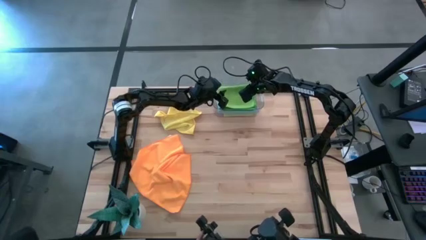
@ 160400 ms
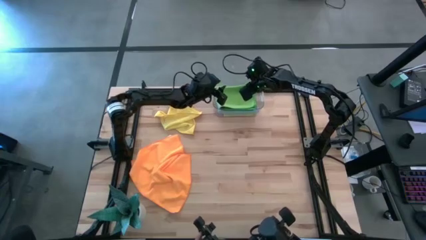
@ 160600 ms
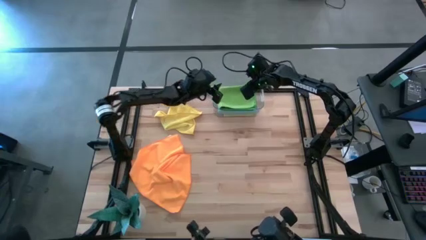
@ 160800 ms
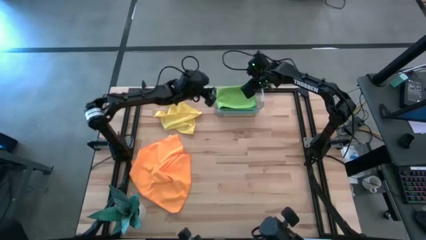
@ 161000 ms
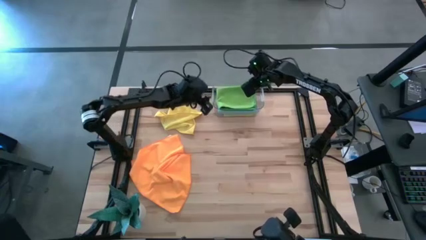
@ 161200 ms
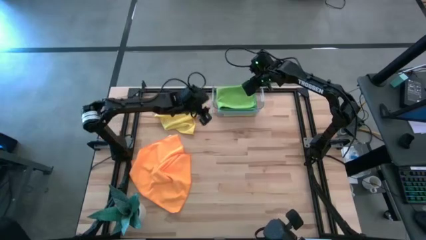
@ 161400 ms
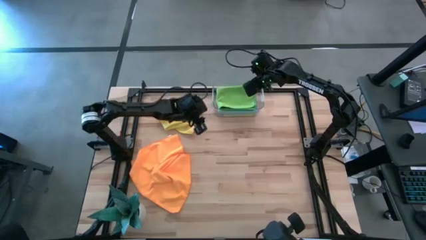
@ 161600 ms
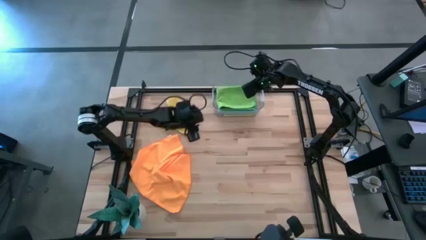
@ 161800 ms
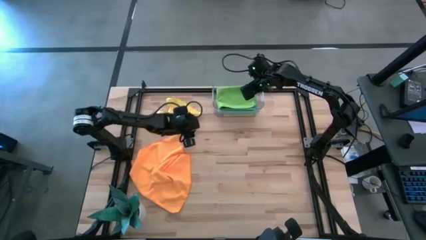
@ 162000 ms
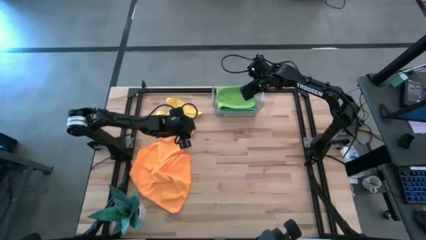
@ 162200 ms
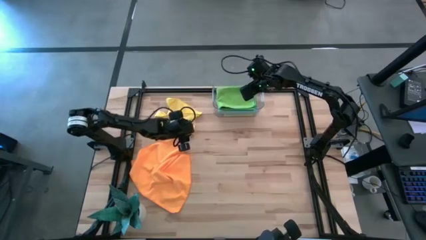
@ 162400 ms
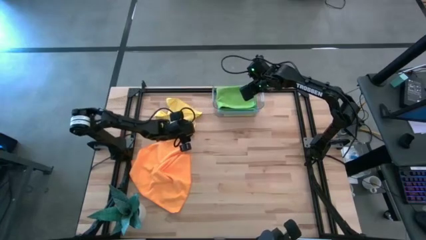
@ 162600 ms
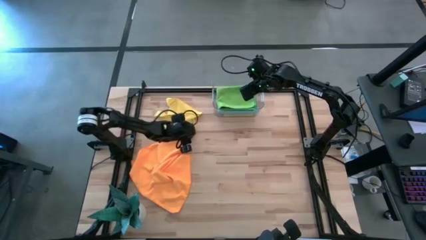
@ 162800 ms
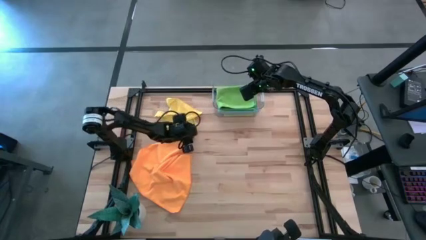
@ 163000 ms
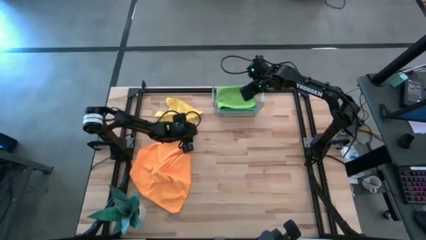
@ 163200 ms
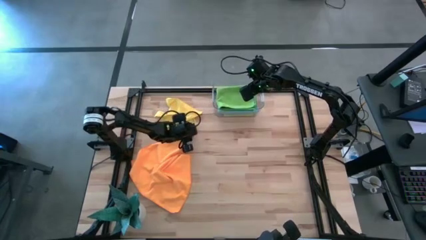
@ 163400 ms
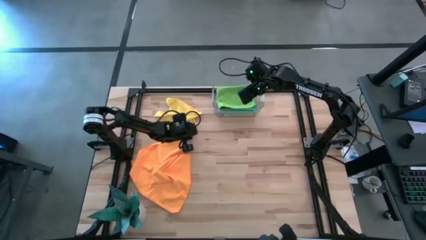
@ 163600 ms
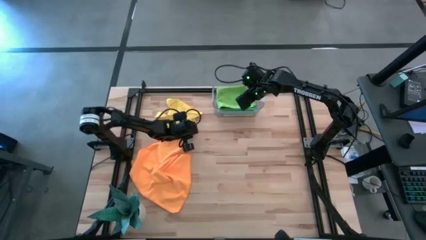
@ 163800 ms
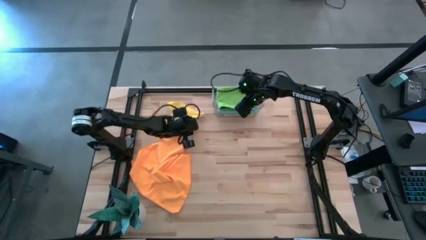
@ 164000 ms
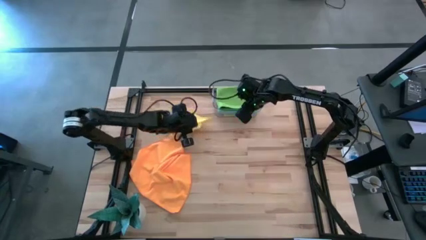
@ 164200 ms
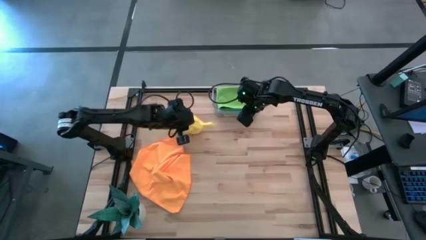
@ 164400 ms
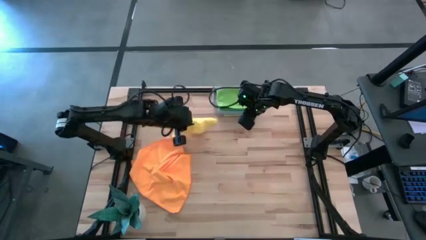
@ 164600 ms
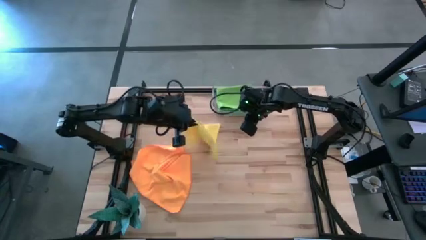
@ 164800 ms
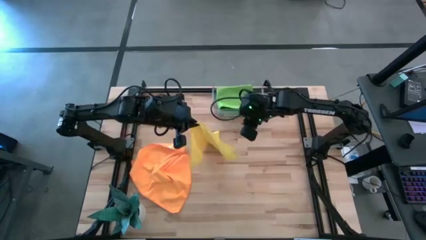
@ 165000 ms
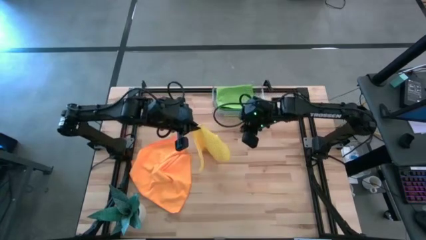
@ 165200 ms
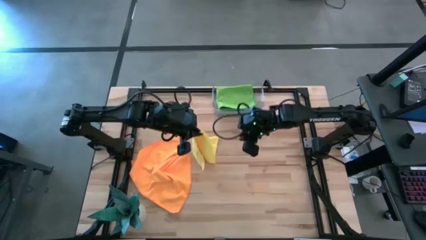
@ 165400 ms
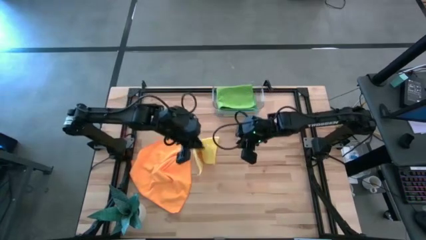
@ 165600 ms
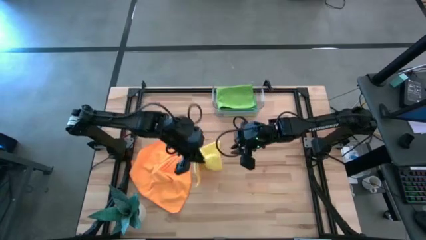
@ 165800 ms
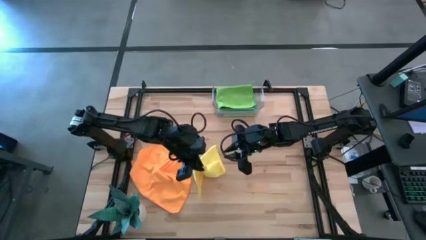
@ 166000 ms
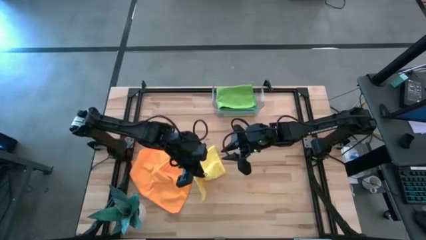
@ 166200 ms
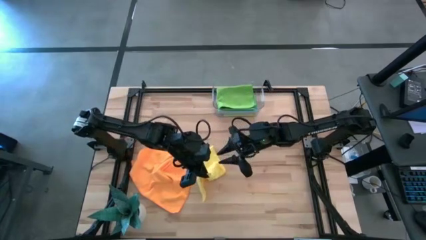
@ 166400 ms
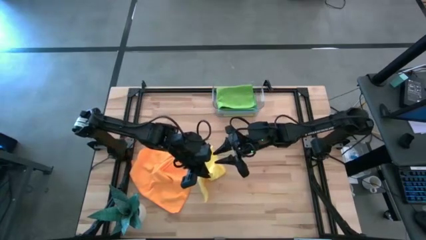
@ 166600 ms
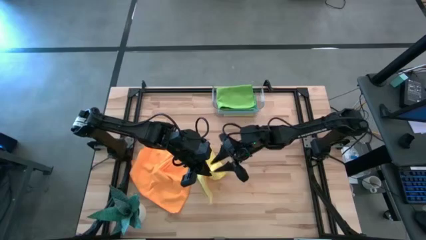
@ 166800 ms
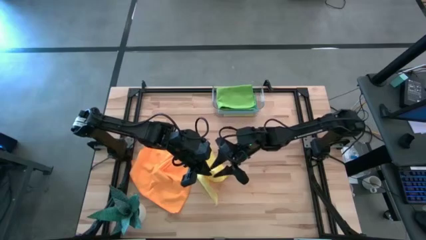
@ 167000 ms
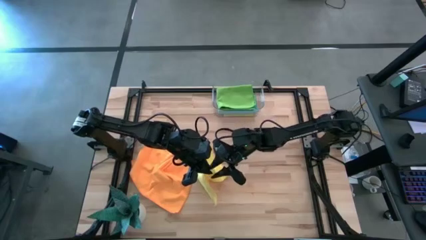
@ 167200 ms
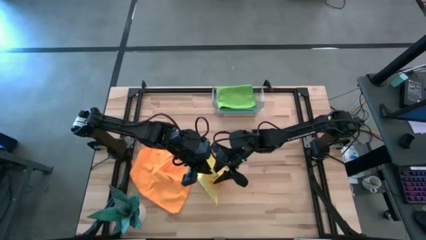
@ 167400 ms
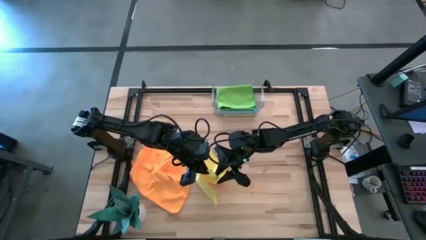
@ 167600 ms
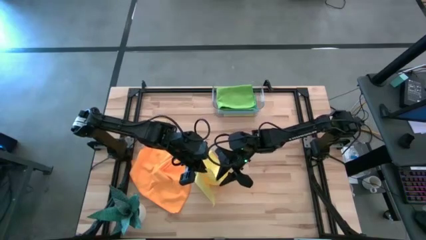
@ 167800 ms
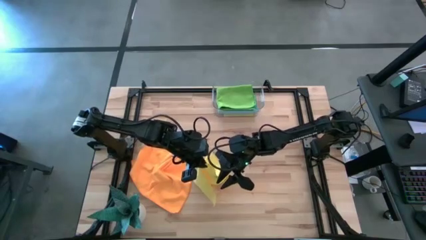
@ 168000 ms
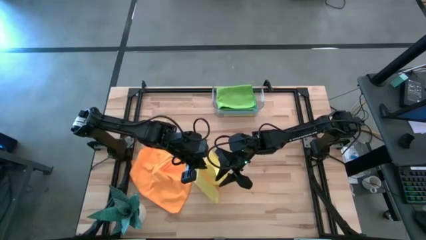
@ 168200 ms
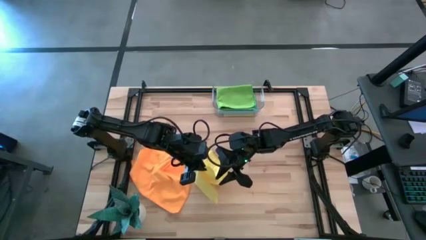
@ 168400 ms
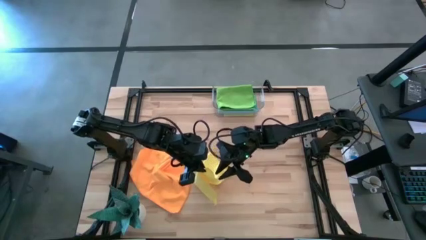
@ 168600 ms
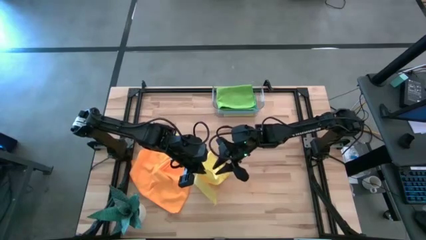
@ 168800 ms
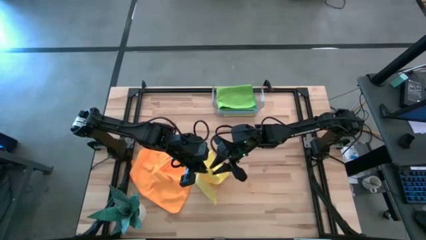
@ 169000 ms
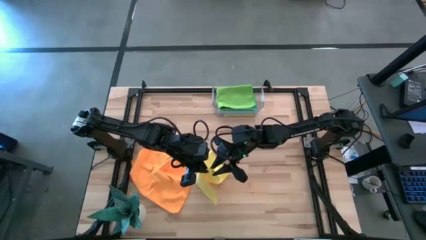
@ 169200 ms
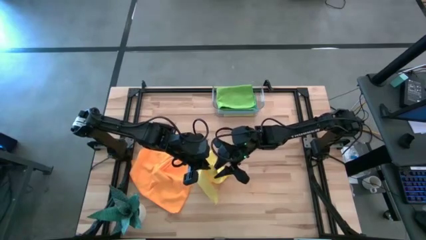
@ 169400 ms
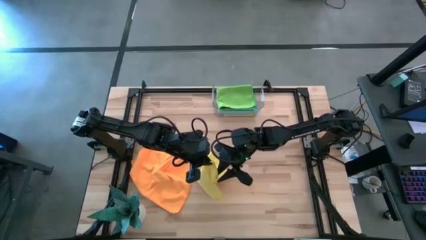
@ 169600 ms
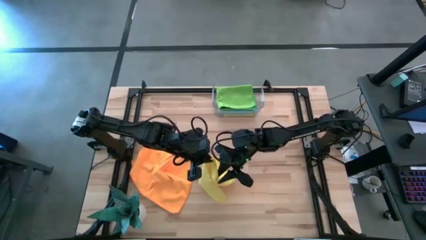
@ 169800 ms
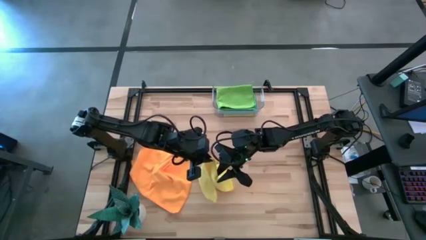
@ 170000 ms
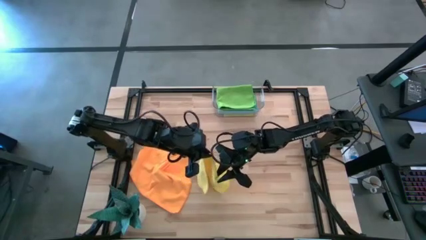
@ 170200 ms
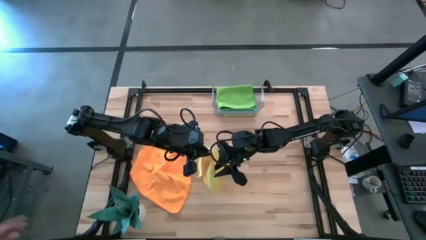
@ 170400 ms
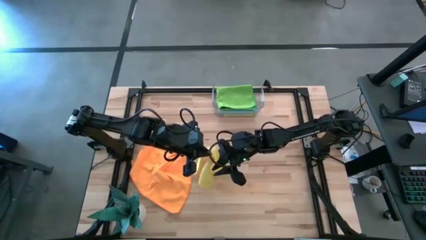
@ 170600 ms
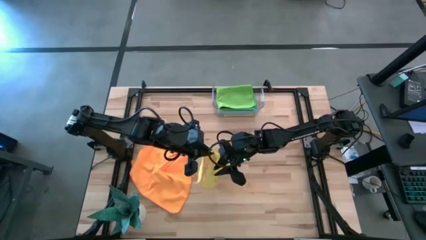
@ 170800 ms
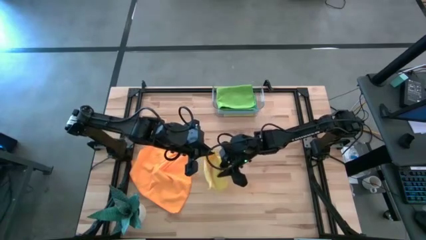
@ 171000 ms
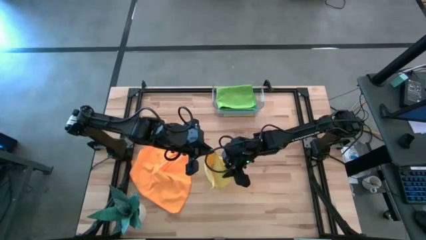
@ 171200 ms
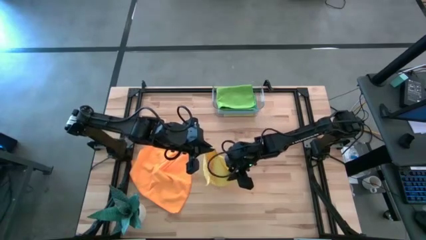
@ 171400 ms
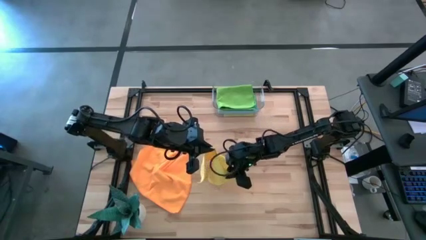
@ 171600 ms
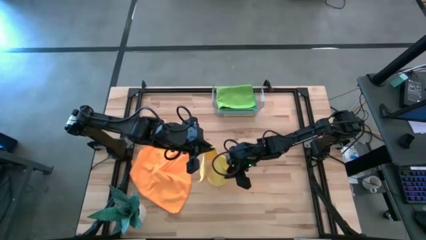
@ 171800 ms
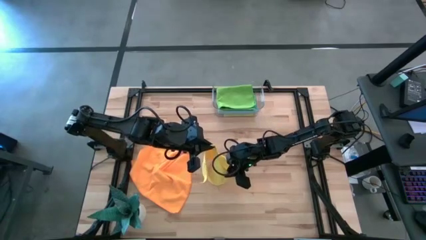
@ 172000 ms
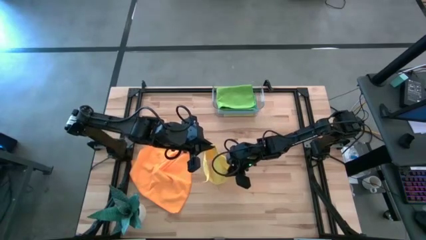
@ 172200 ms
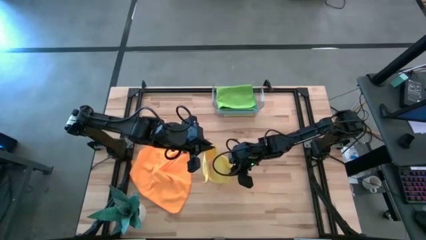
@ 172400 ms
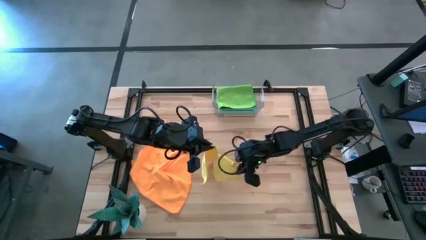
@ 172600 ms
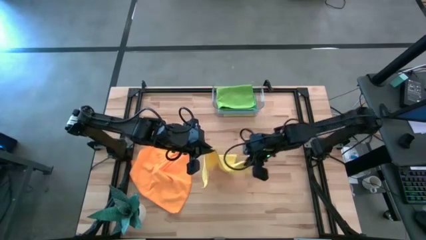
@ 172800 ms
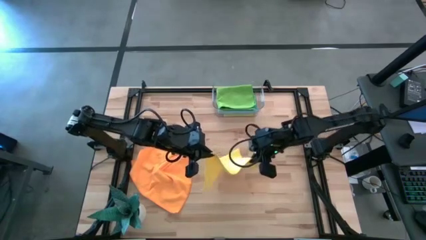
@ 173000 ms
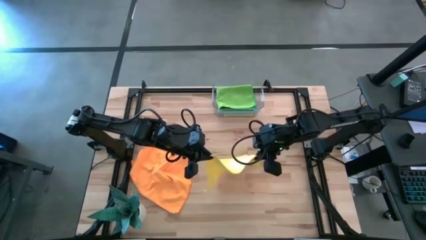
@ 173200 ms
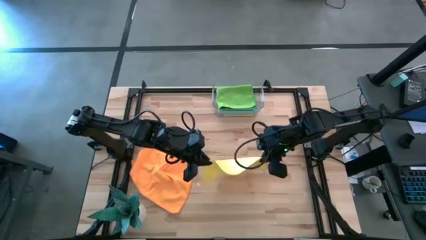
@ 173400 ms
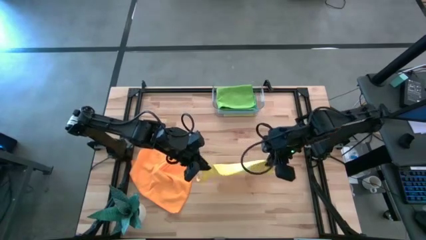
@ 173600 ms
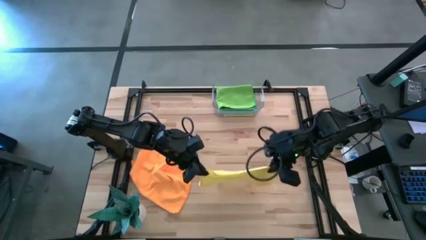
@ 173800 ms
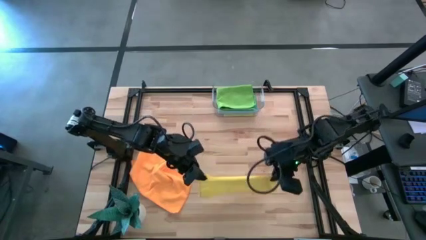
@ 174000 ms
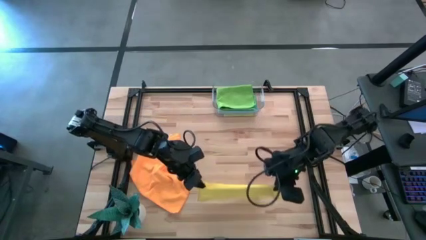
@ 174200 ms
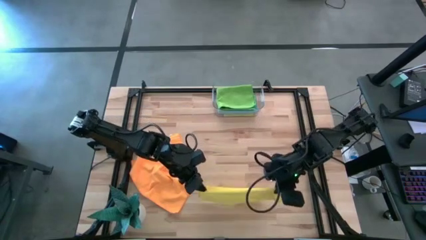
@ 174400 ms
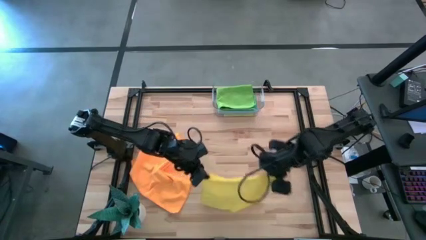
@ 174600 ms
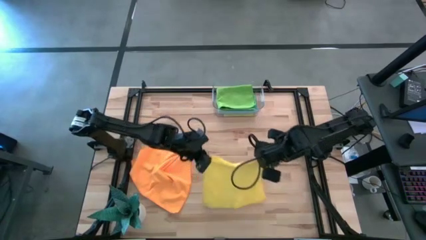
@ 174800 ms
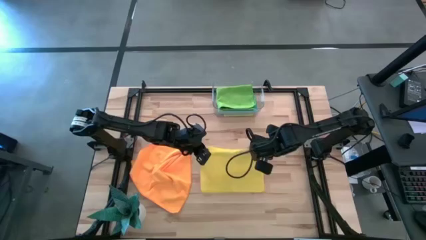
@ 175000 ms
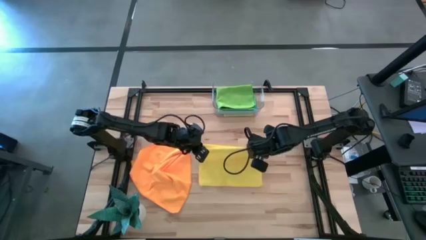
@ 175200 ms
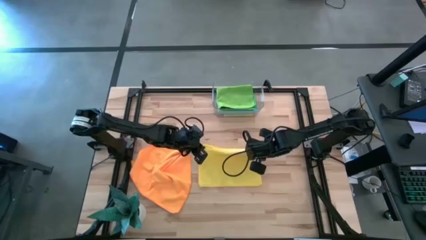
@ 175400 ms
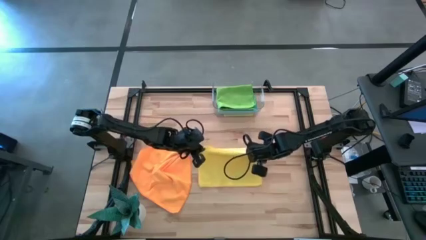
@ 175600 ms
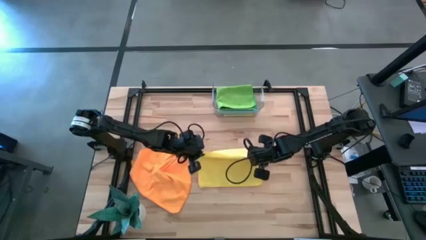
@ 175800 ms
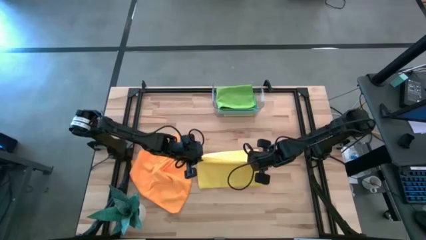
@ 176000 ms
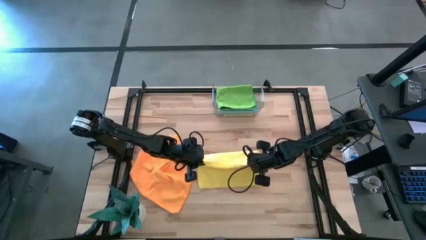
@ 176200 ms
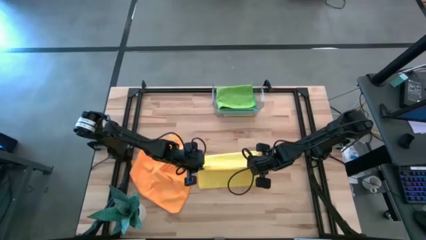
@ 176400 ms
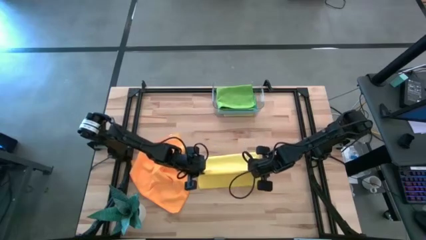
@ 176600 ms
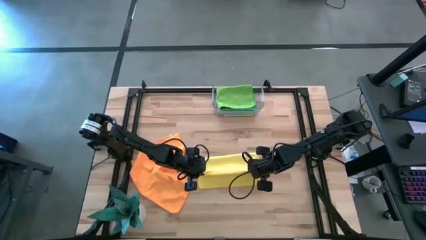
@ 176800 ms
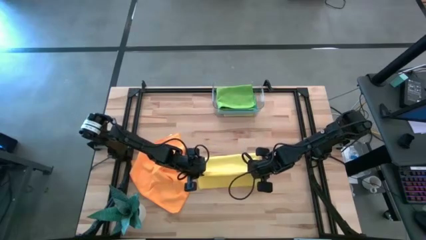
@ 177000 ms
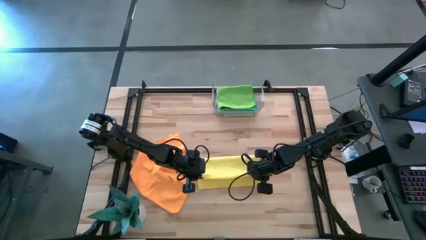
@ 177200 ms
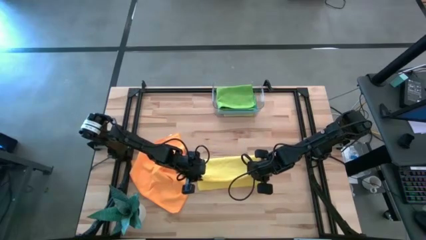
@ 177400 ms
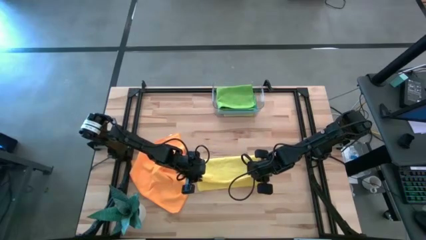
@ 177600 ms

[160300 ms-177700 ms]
Task: Fold microfiber towels
Fold the yellow microfiber cloth
